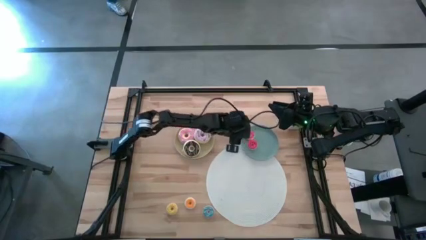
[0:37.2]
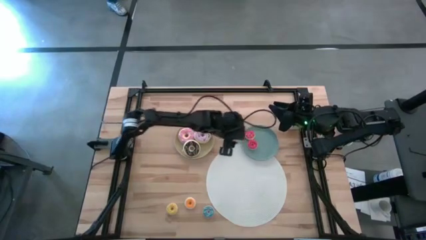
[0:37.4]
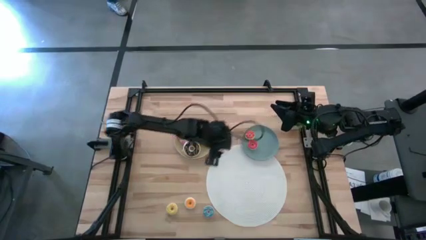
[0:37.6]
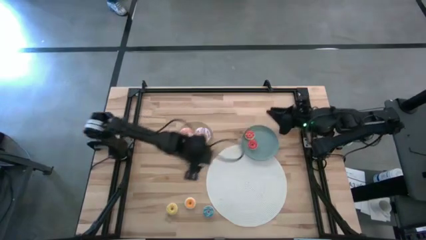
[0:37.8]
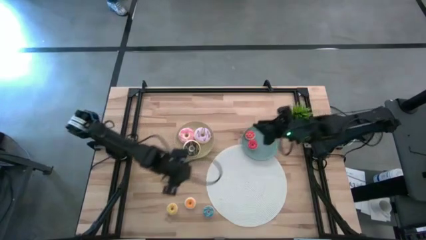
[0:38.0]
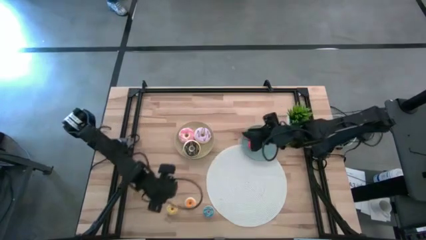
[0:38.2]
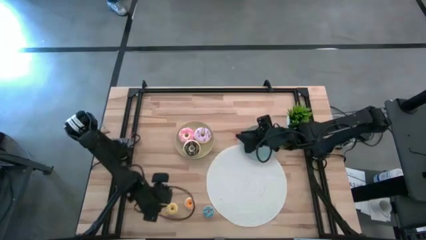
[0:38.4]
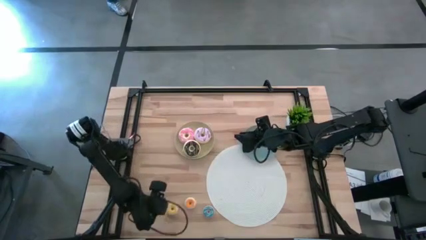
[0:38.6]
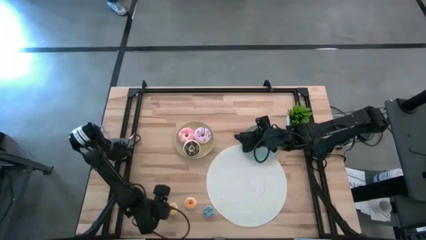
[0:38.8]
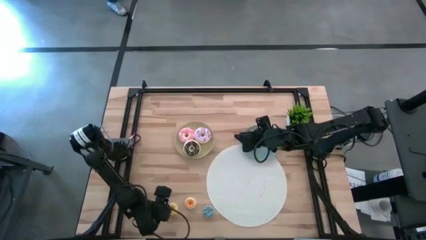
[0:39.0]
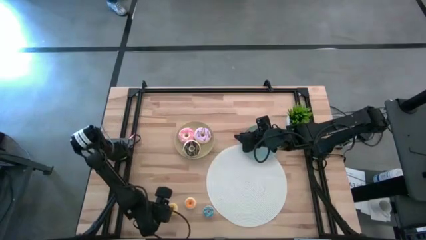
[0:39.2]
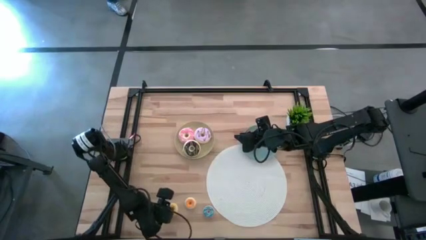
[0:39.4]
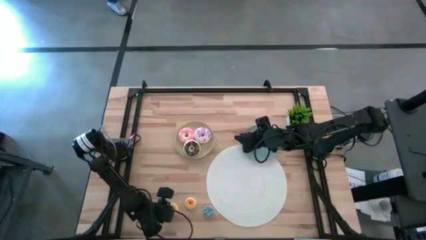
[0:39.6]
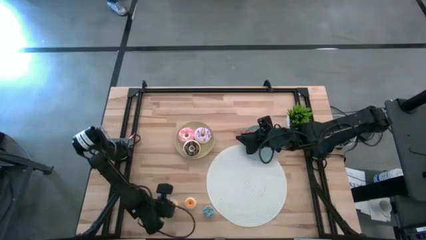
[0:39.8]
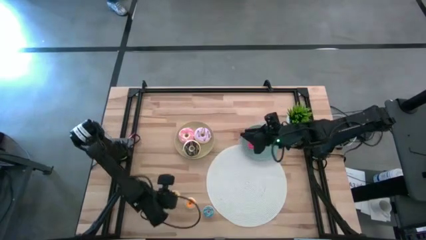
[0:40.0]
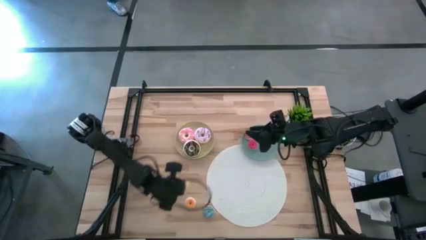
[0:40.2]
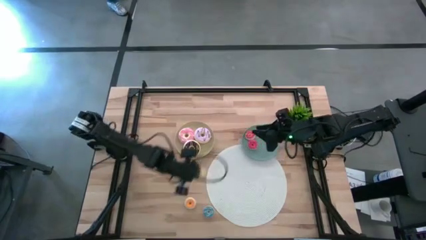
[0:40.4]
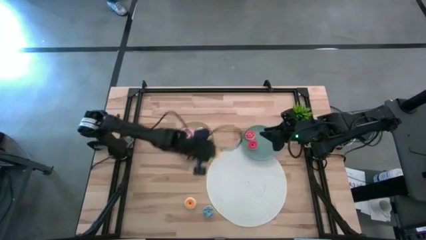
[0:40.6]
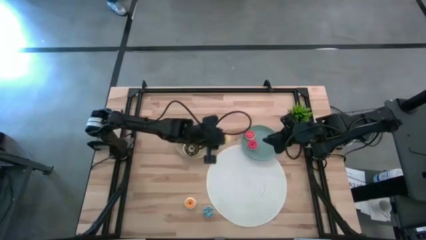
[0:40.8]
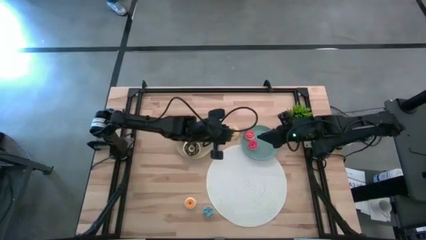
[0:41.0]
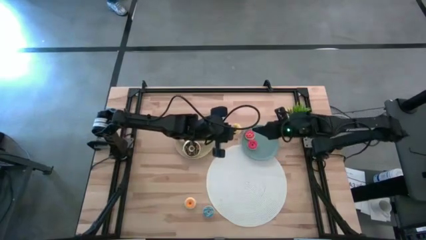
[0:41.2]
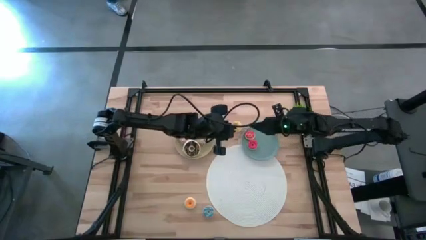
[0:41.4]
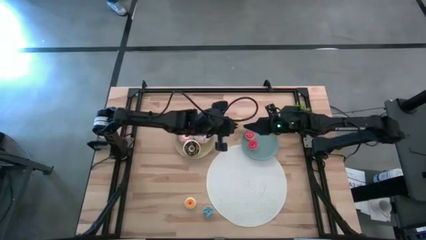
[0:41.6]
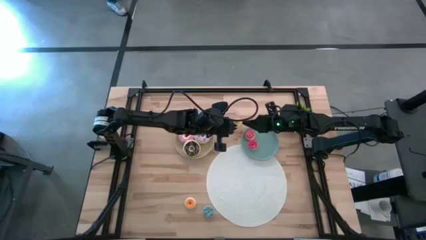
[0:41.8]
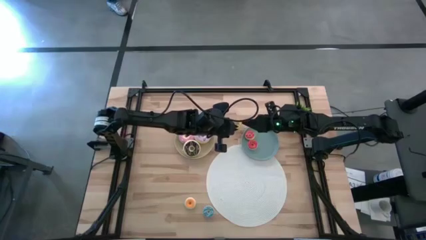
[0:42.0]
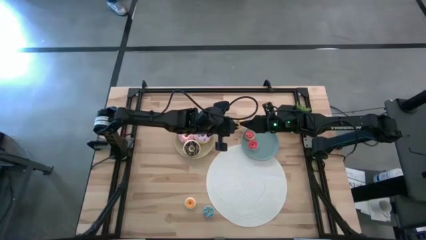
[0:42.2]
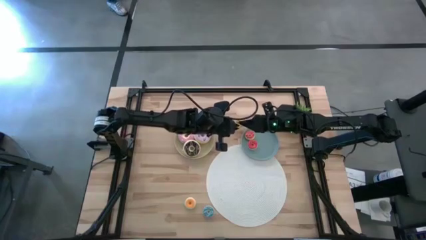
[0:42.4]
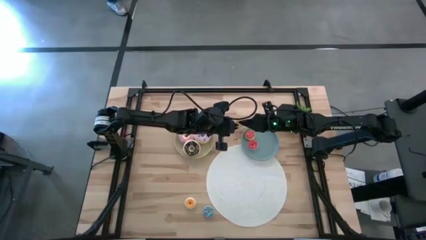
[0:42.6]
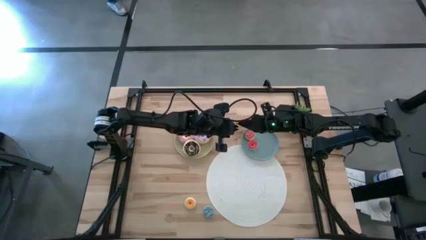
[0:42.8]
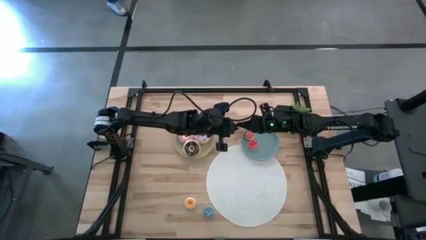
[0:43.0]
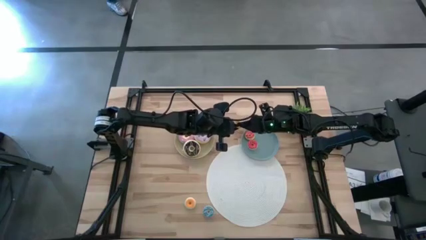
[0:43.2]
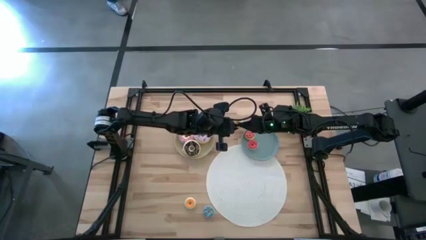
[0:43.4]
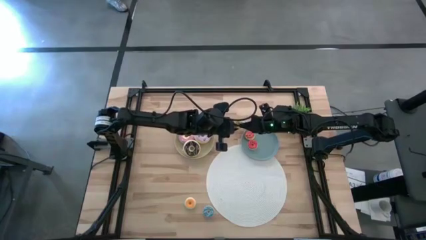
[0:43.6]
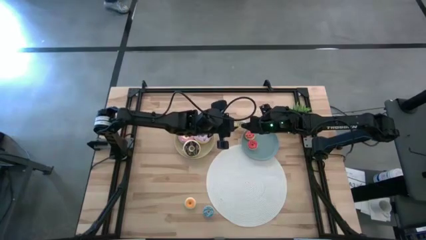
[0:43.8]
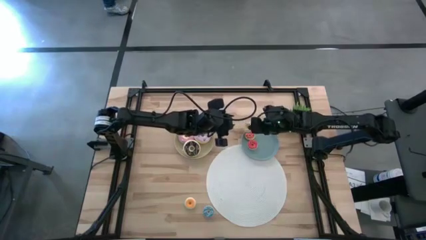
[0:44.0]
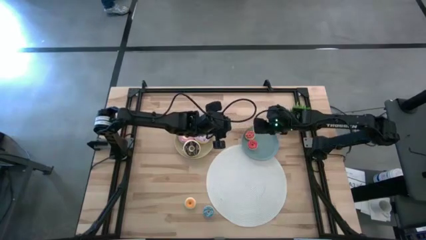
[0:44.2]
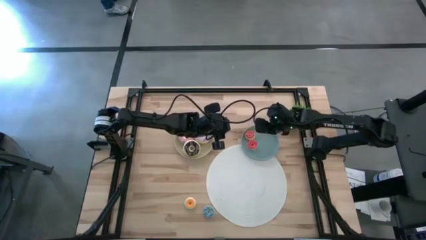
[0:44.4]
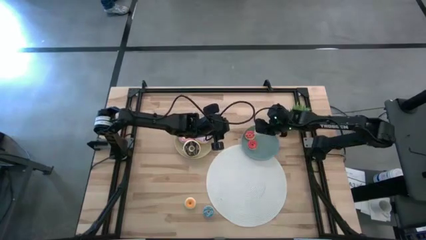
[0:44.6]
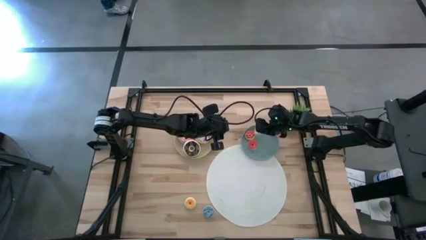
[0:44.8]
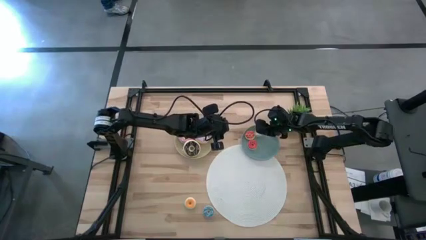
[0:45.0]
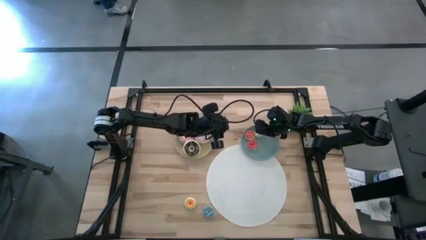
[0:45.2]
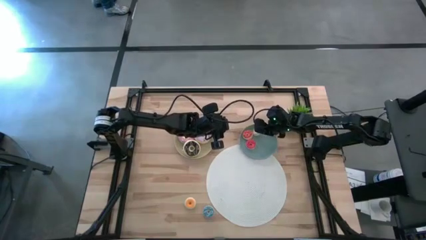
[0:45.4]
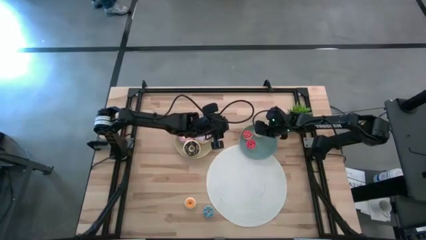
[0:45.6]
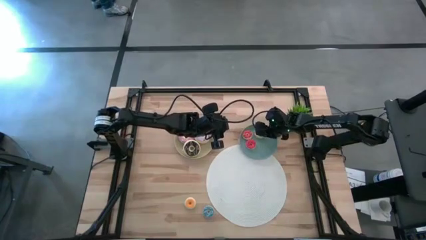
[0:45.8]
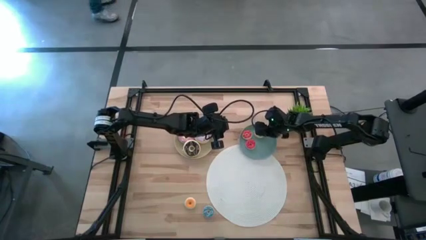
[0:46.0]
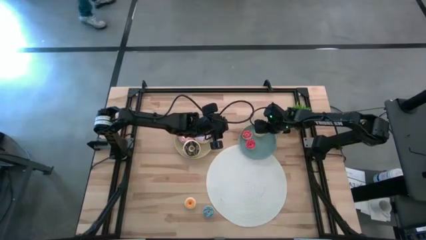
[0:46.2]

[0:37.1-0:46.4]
Task: Pick & Place donuts
Put the small yellow donut on the blue plate

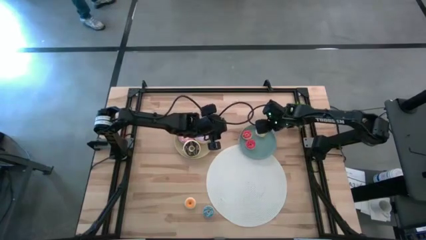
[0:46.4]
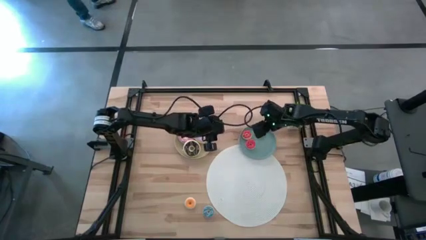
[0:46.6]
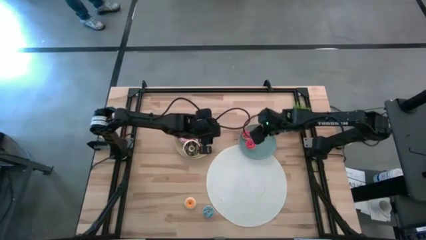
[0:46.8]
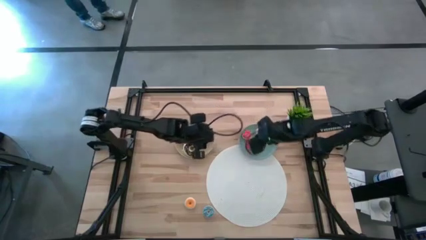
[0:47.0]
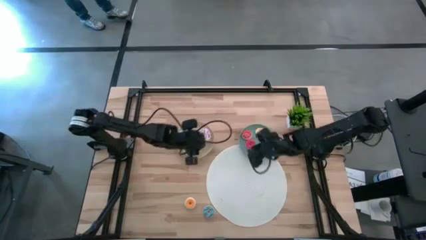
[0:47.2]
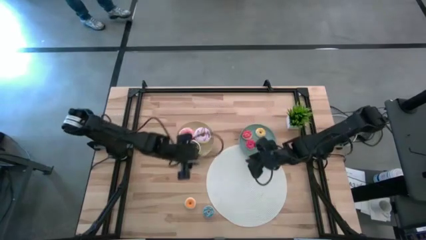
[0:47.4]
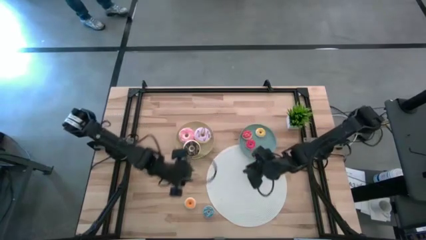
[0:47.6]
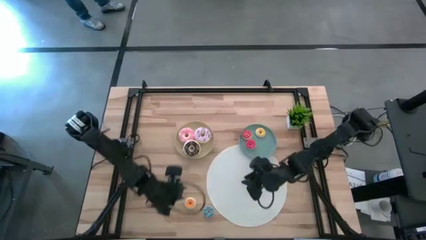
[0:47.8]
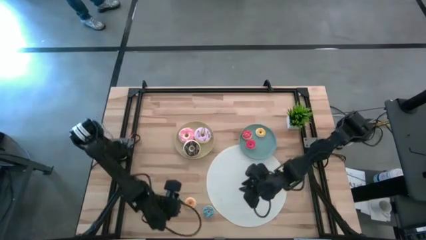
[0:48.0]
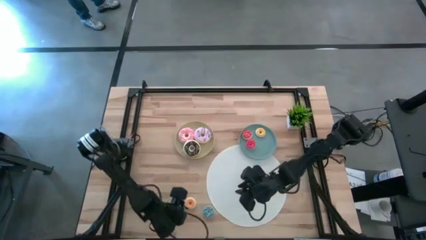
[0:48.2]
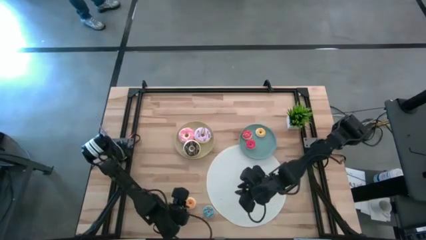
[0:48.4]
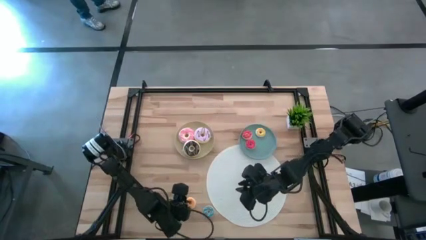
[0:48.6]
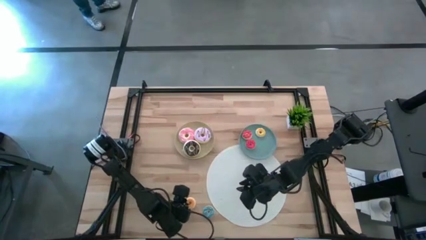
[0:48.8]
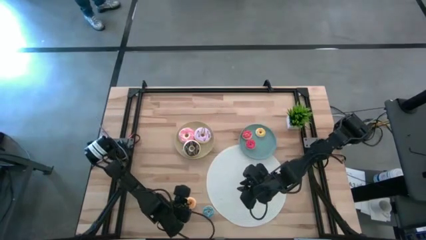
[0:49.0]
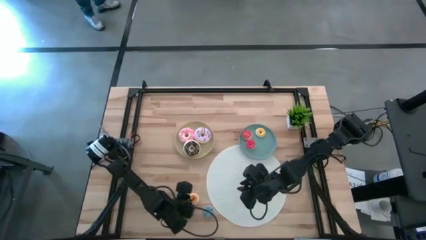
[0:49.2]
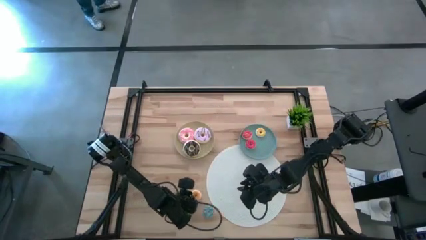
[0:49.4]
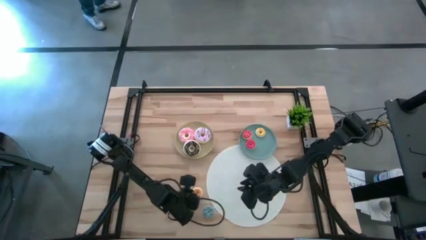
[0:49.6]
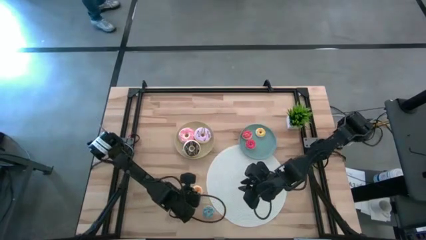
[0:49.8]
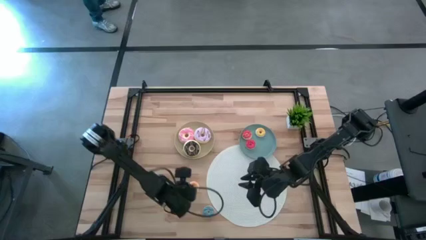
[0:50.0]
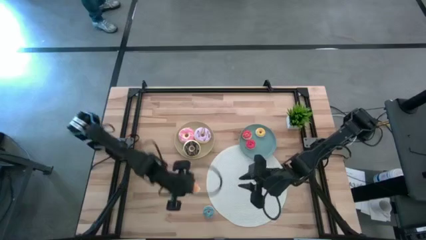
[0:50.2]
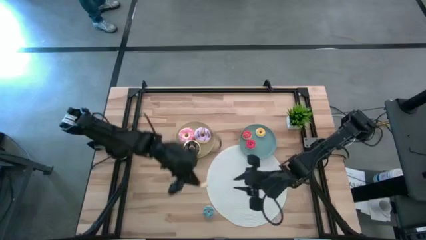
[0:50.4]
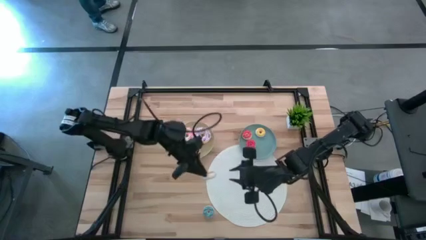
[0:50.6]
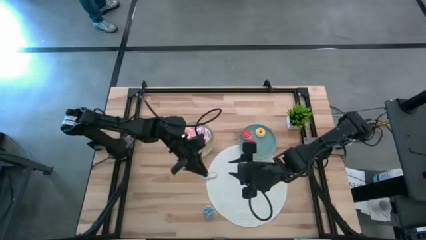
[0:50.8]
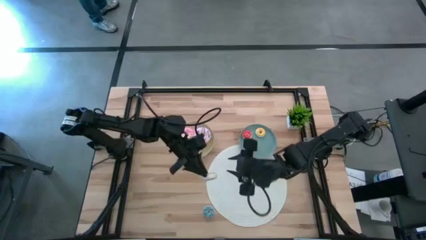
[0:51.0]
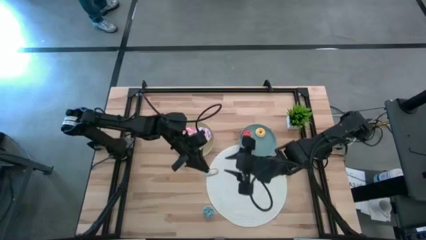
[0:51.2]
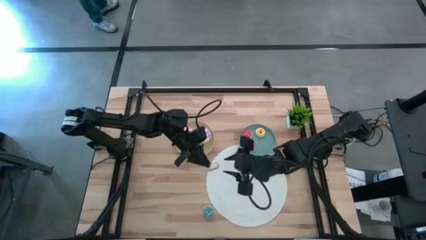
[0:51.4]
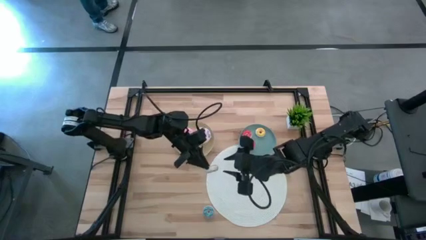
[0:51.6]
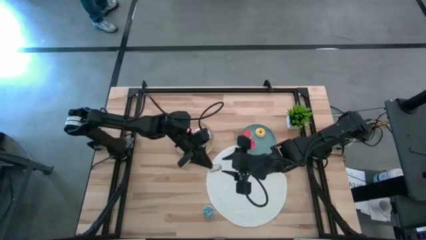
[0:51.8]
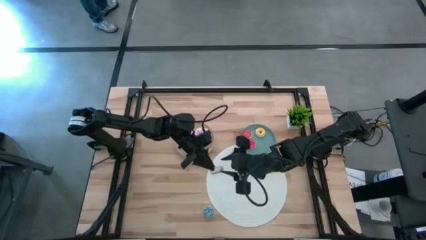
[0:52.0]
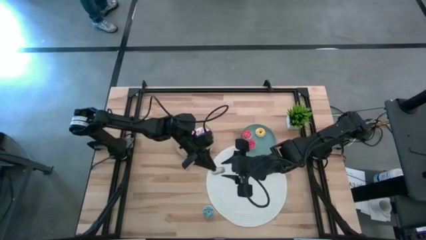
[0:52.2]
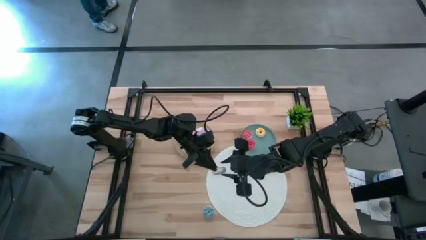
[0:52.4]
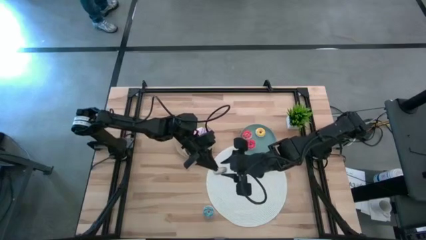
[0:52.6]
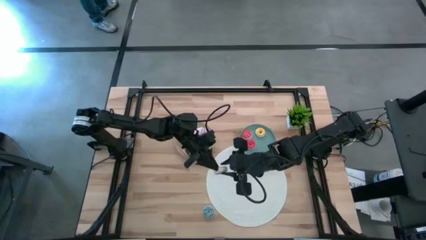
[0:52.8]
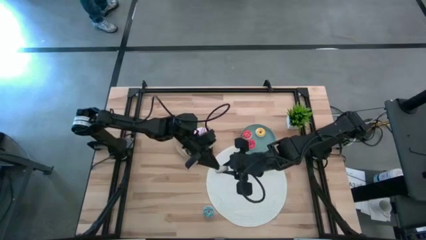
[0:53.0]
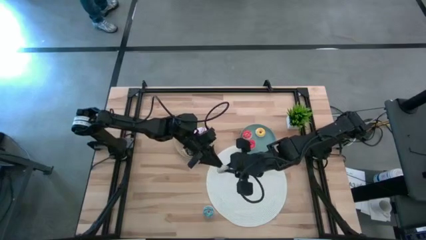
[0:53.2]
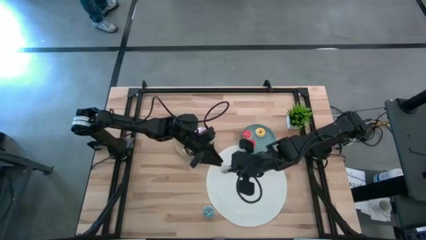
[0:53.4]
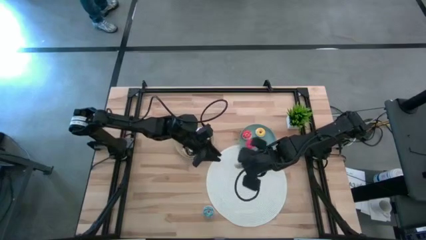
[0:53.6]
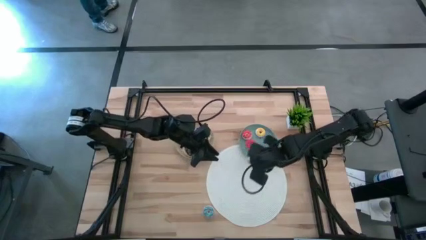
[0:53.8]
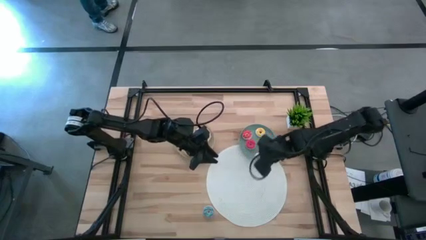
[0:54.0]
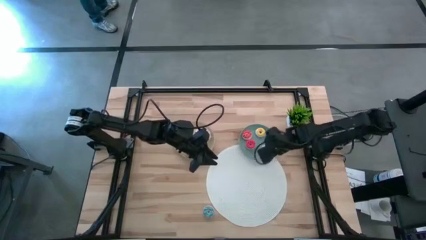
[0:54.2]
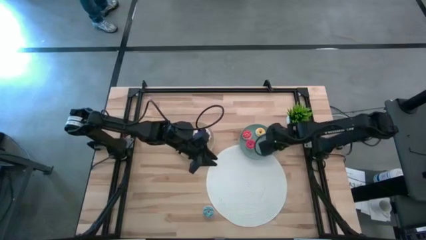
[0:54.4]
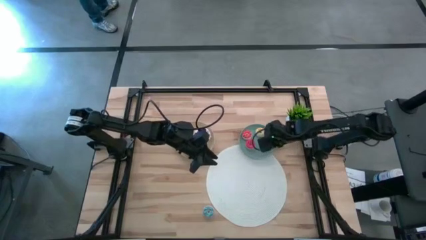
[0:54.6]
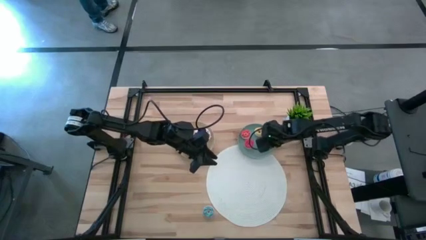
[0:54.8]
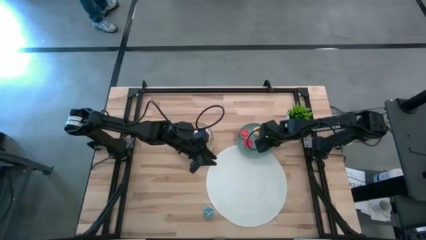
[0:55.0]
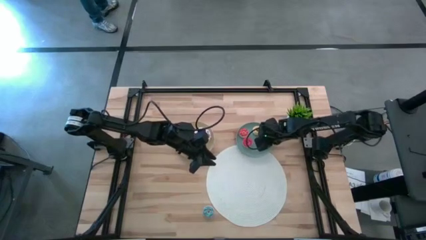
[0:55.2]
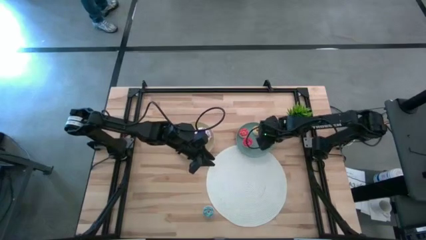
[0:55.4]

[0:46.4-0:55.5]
Put the small orange donut on the blue plate
